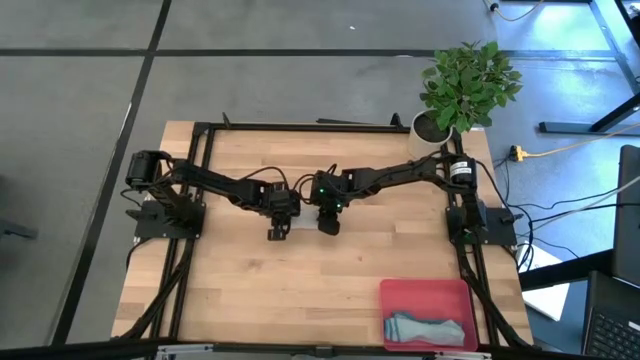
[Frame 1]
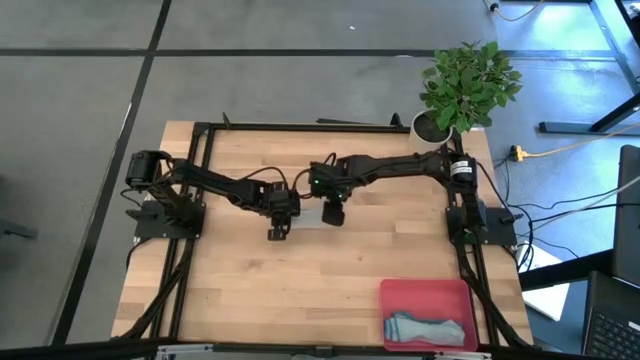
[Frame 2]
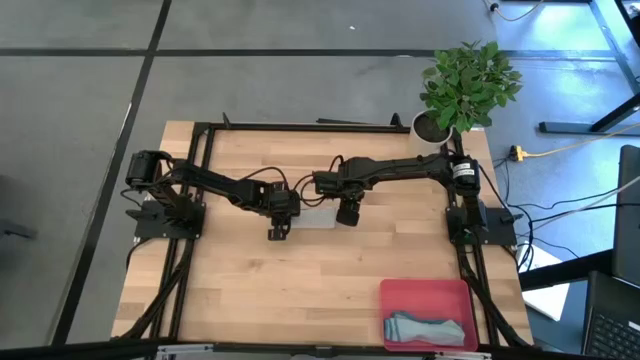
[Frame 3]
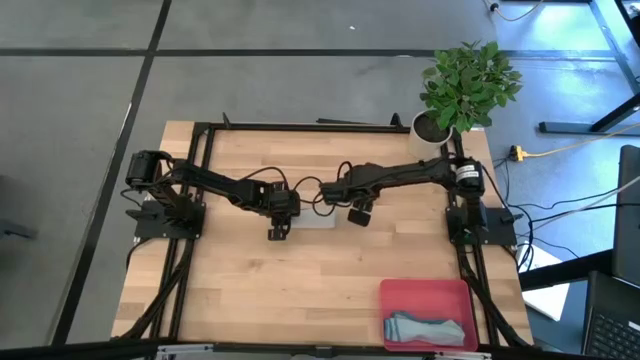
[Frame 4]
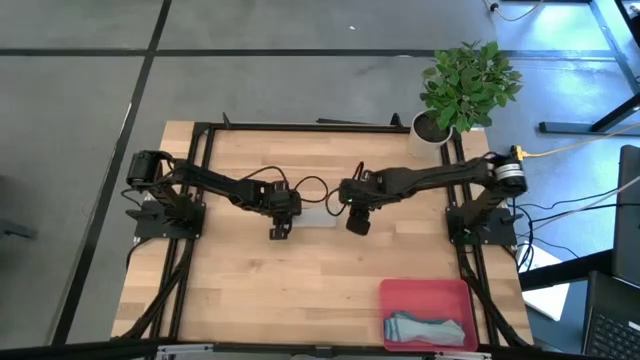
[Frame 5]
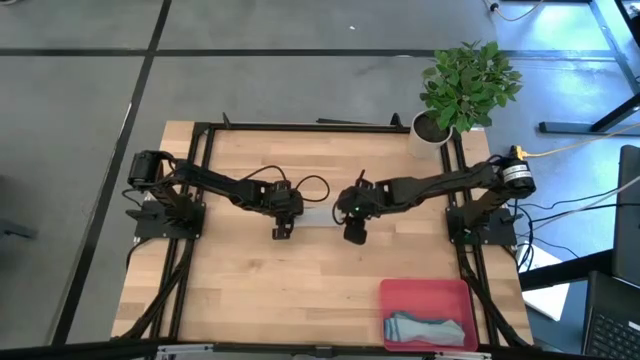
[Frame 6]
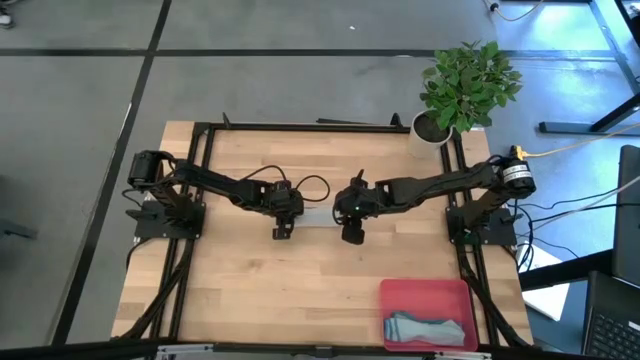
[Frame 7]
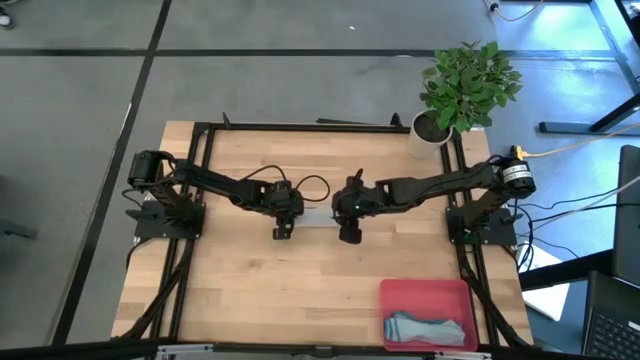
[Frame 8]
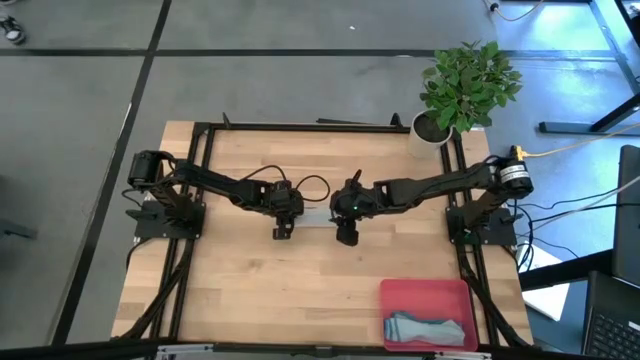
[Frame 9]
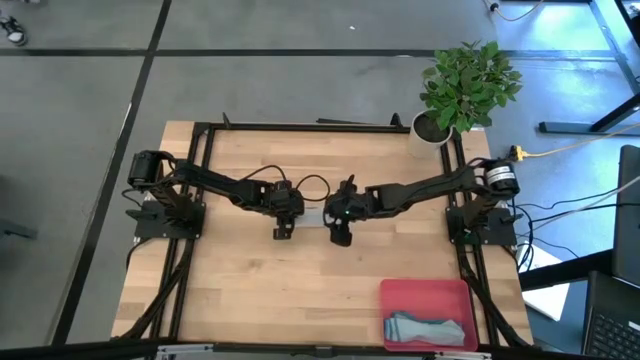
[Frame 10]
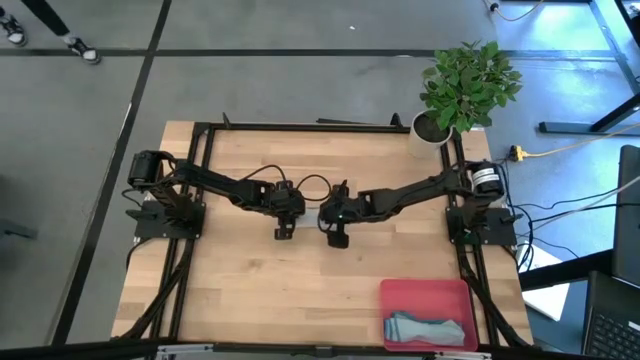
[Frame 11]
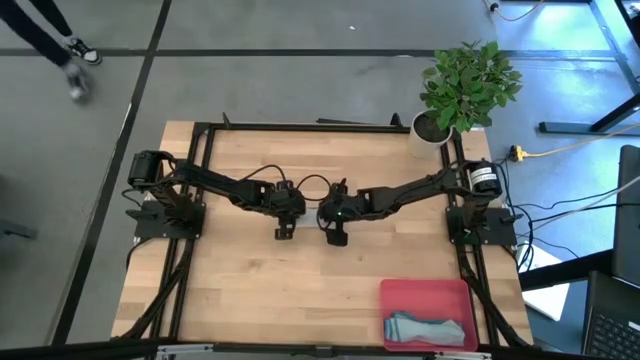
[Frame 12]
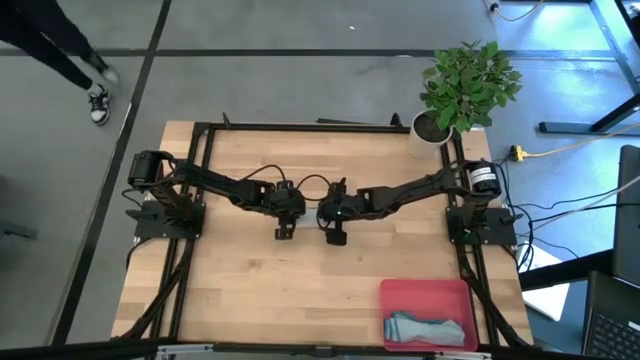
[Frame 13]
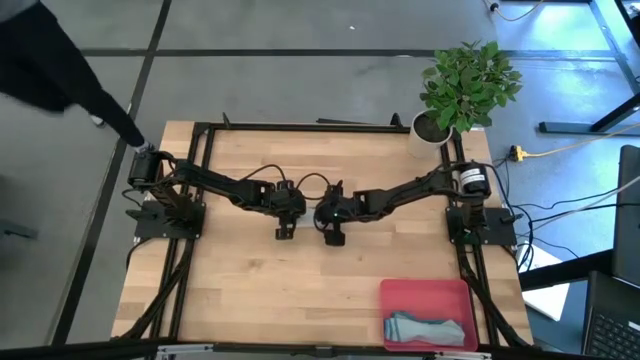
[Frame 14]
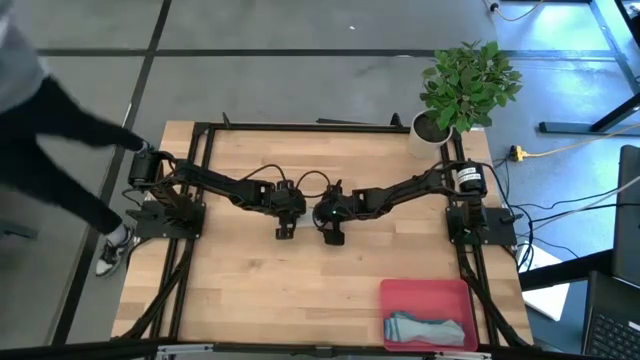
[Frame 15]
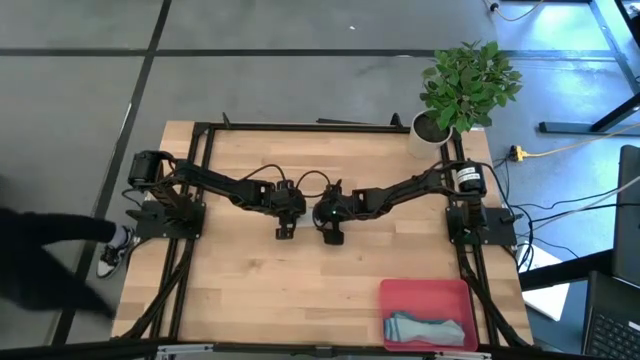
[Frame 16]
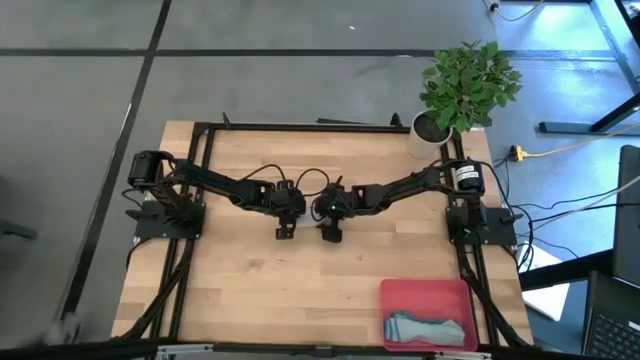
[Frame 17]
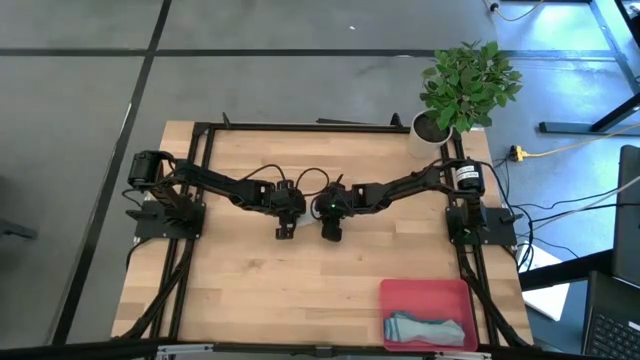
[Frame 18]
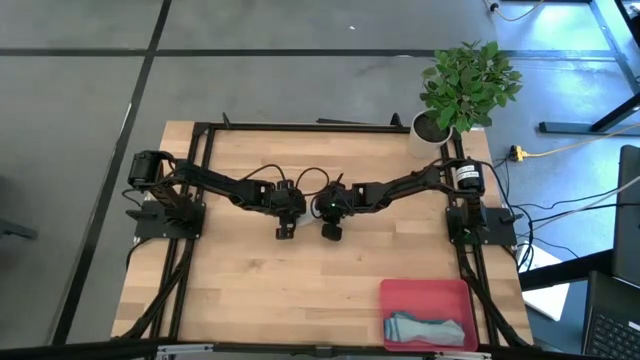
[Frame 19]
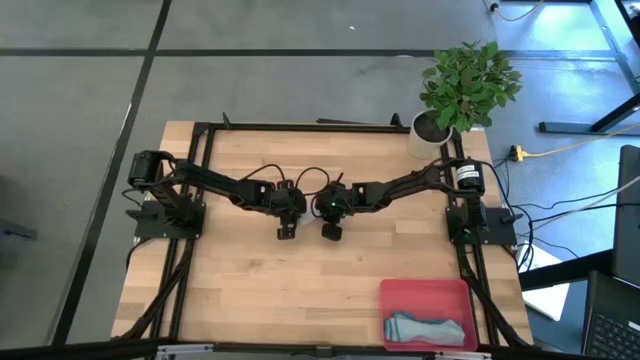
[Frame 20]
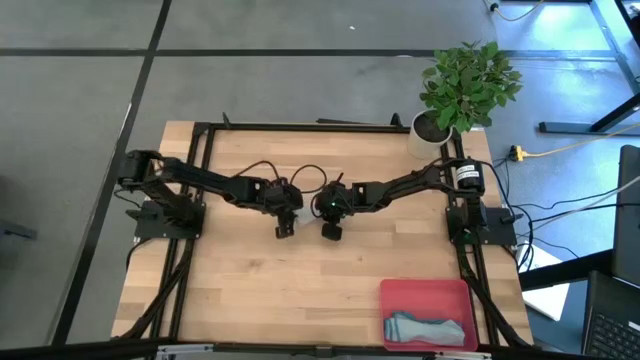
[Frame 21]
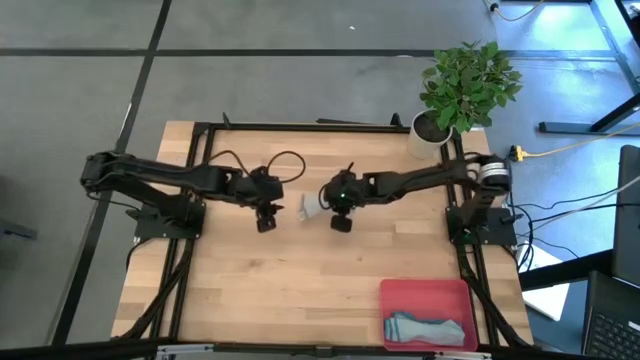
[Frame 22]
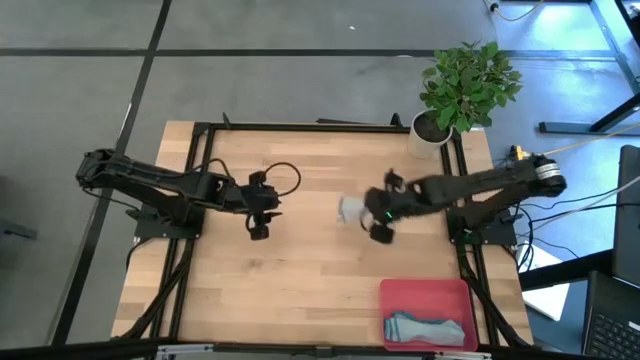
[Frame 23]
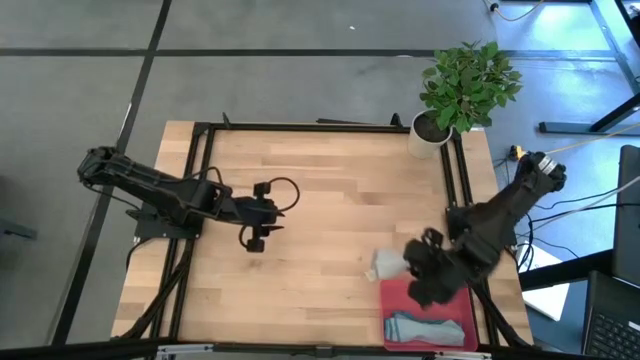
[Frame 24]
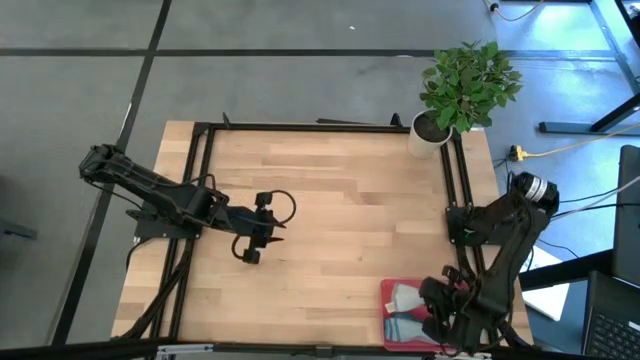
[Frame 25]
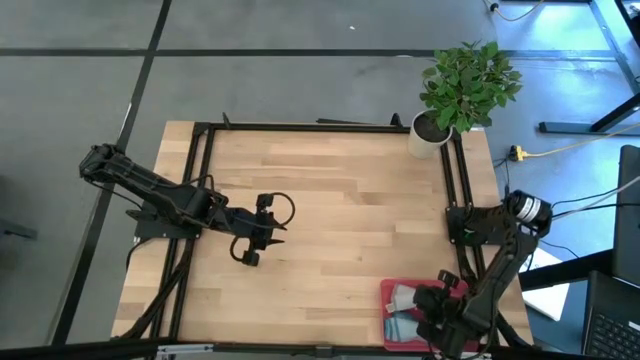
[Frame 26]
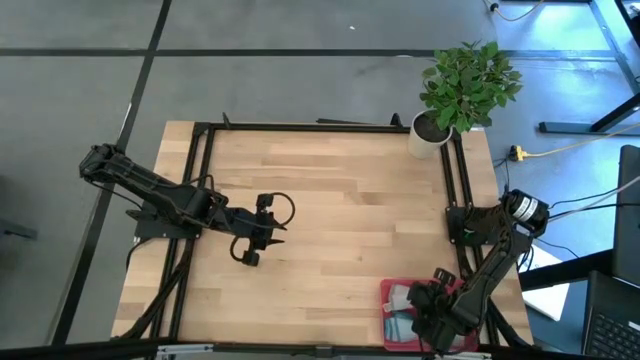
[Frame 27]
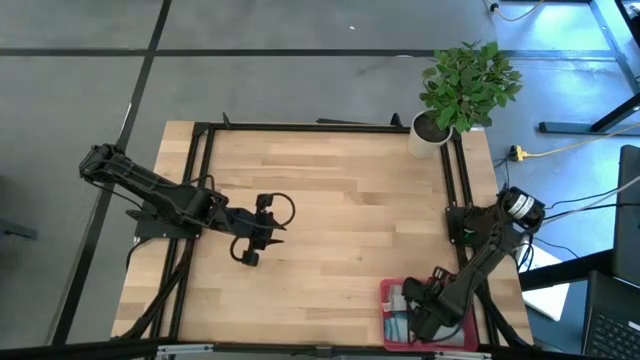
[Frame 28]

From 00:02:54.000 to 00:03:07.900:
Task: Roll microfiber towels into tight, uniform cylinder then place into a basket
Put the rolled gray towel into the bin

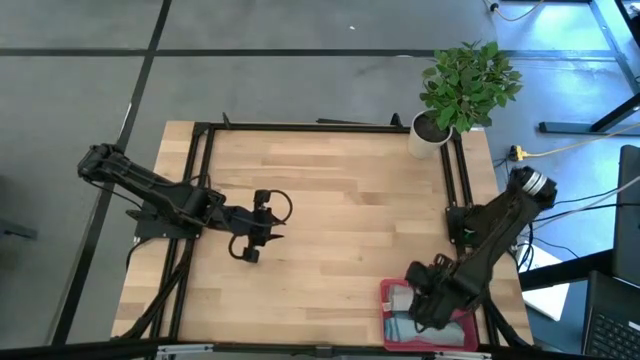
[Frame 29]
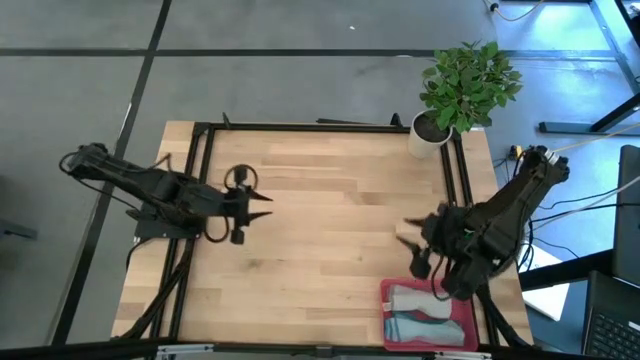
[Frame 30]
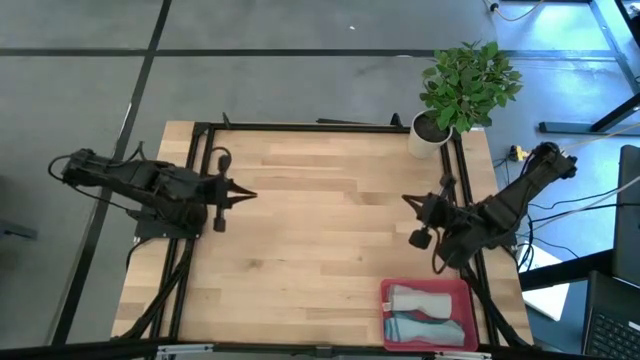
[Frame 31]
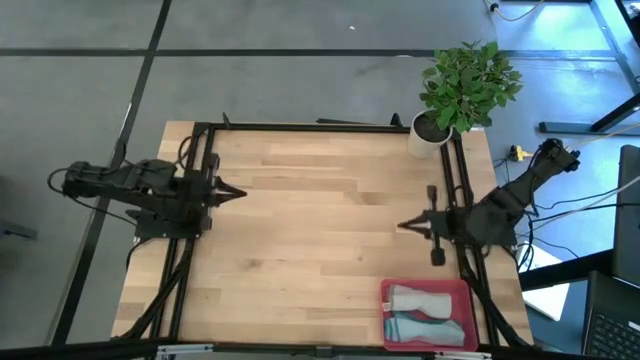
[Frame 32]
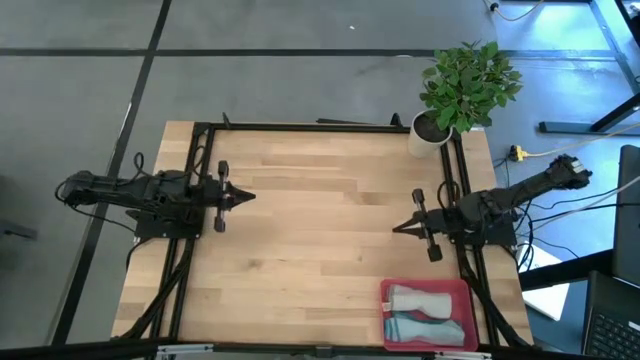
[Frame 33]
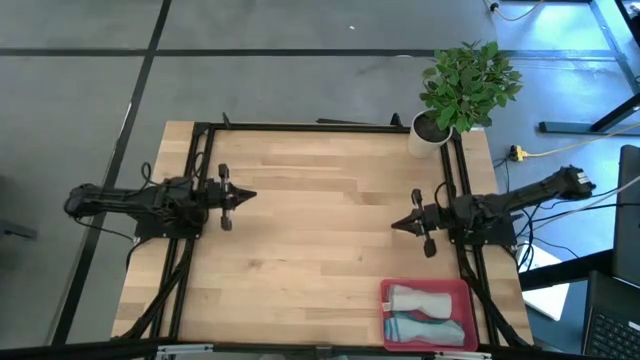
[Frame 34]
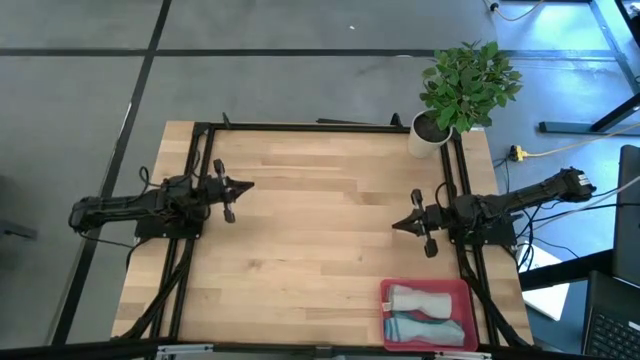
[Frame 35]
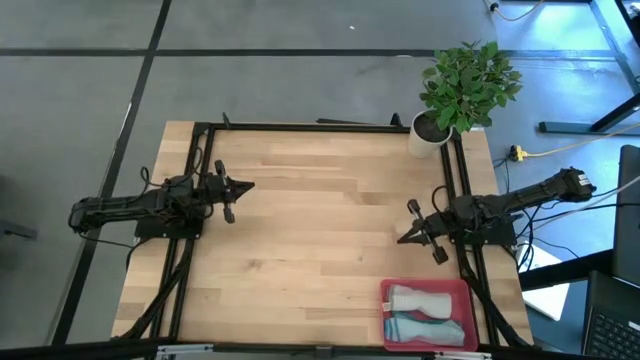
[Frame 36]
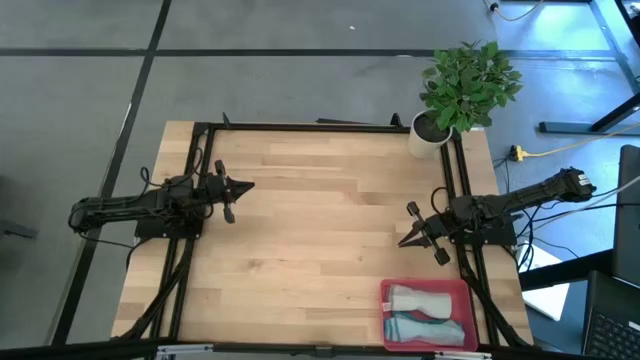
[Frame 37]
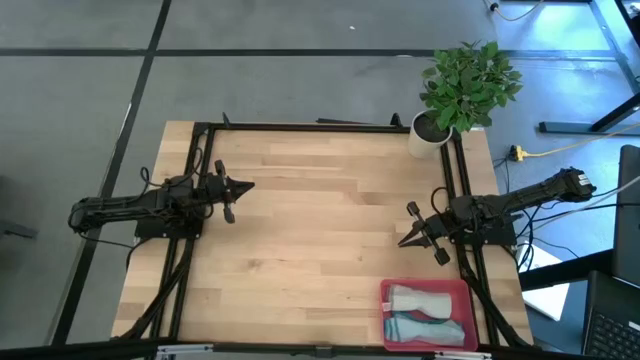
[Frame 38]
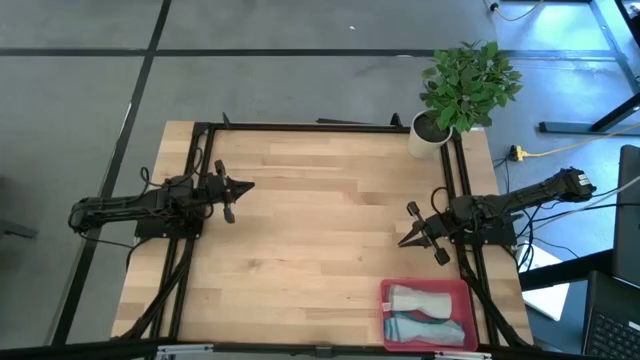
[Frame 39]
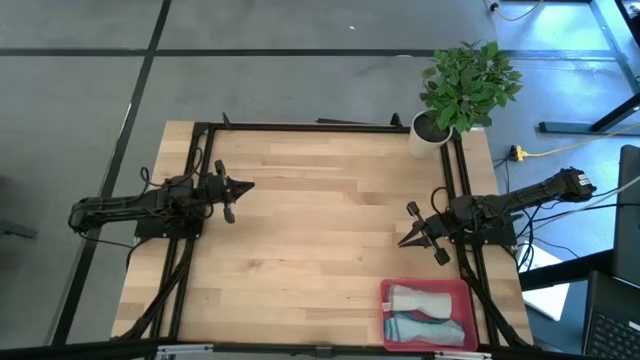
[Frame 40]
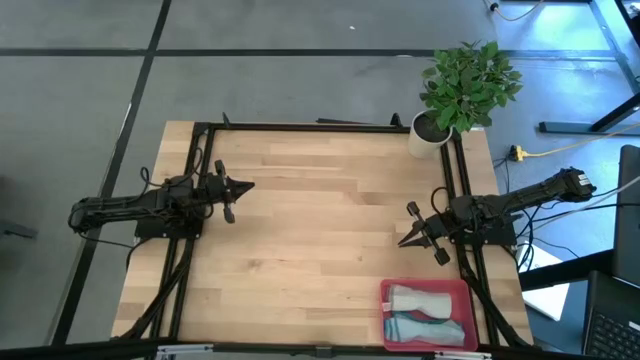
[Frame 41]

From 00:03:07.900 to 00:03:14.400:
Return to home position
